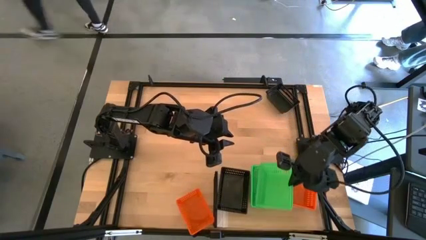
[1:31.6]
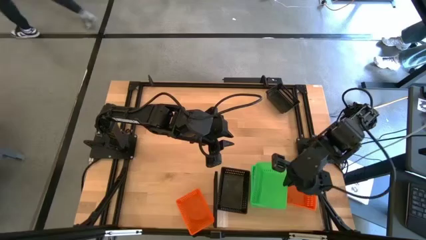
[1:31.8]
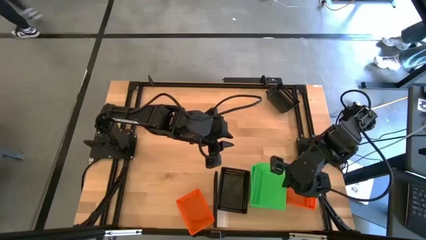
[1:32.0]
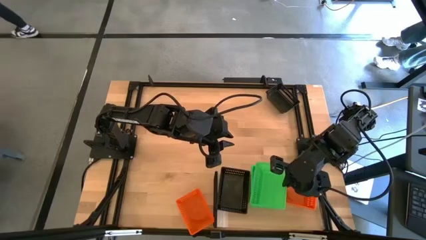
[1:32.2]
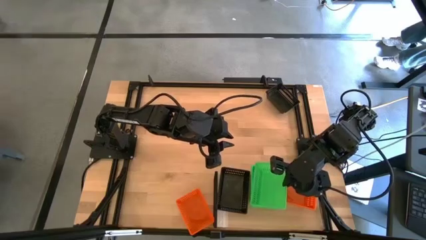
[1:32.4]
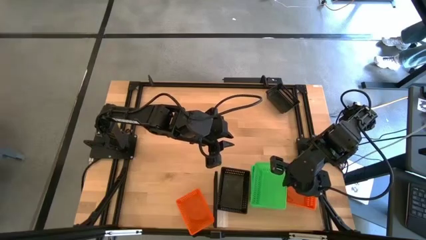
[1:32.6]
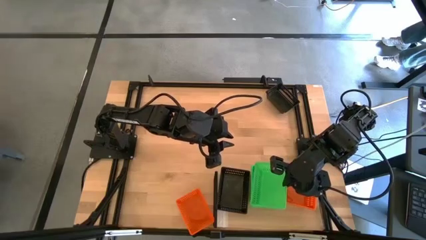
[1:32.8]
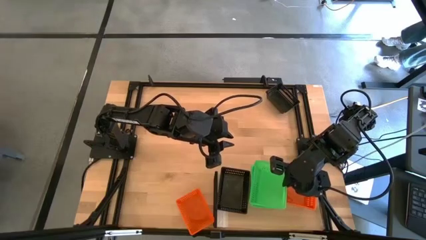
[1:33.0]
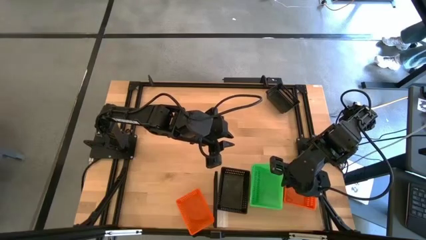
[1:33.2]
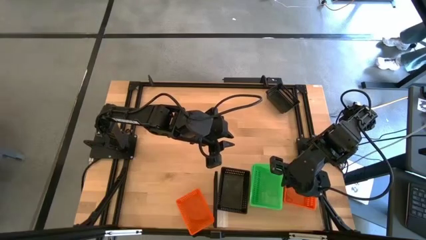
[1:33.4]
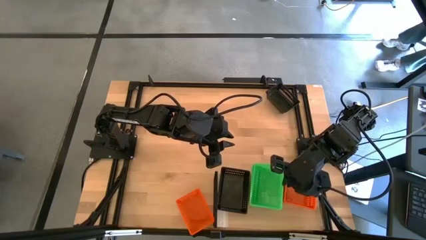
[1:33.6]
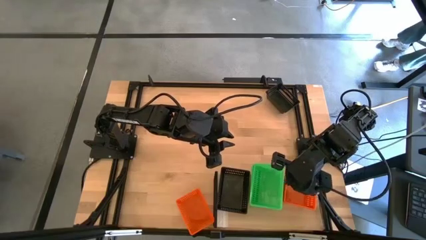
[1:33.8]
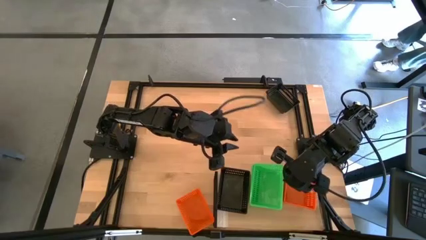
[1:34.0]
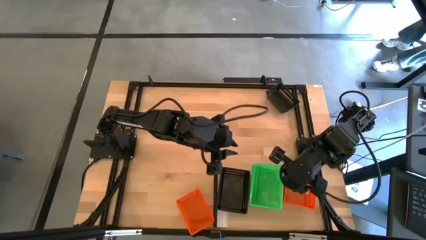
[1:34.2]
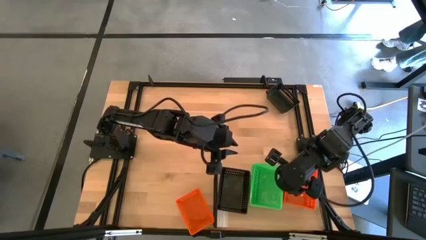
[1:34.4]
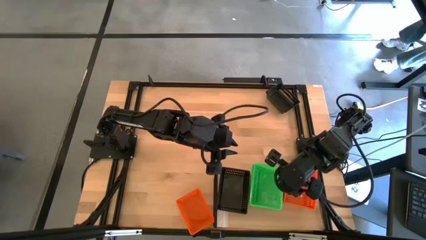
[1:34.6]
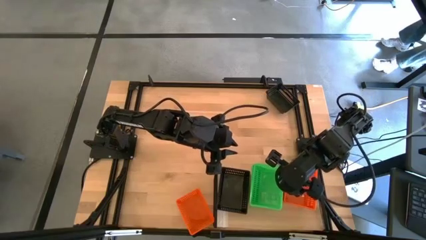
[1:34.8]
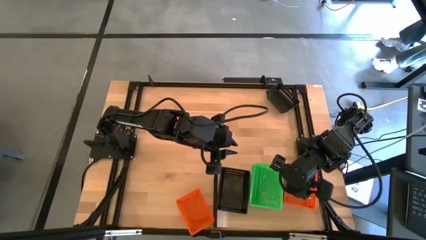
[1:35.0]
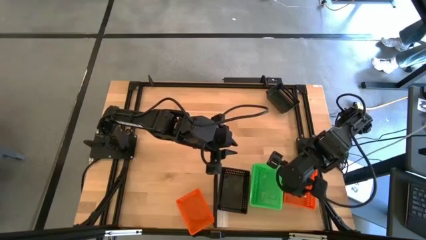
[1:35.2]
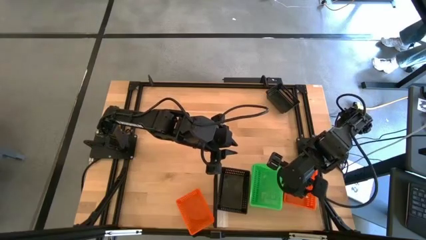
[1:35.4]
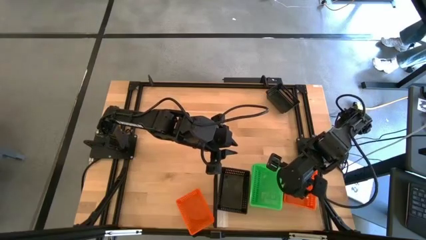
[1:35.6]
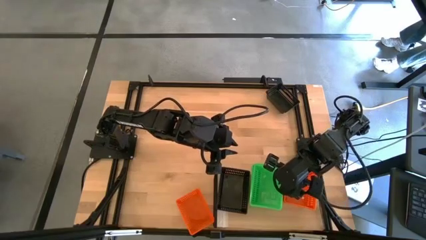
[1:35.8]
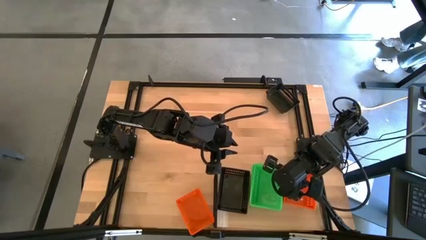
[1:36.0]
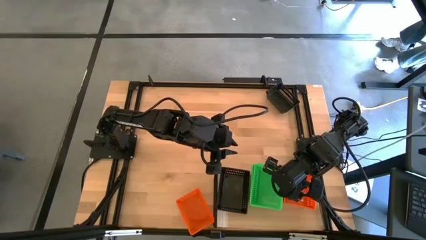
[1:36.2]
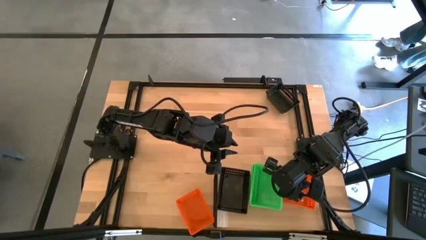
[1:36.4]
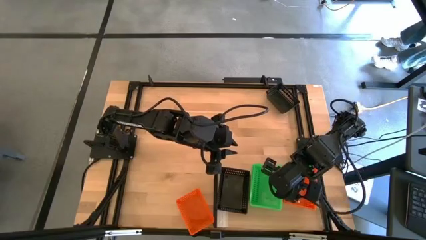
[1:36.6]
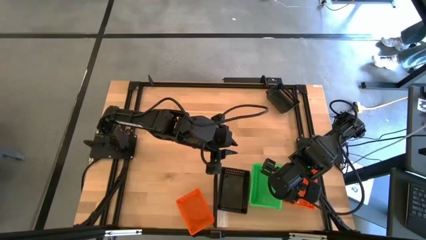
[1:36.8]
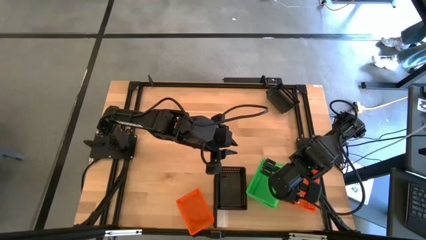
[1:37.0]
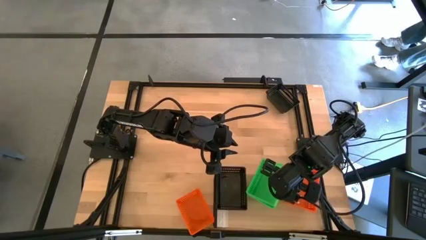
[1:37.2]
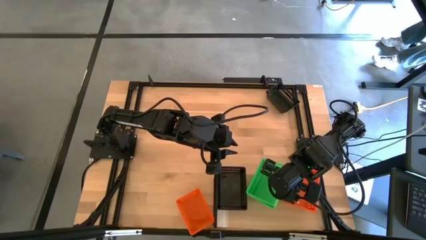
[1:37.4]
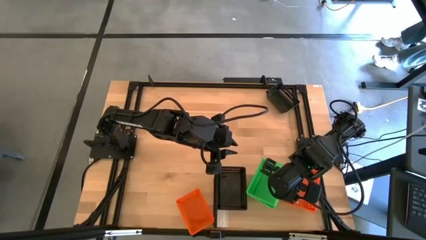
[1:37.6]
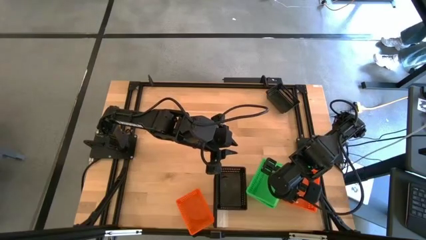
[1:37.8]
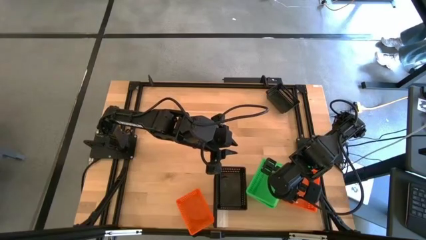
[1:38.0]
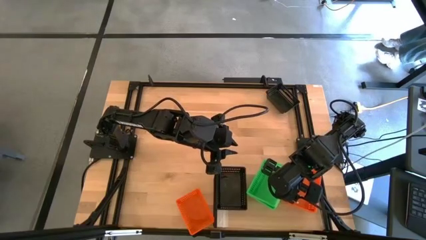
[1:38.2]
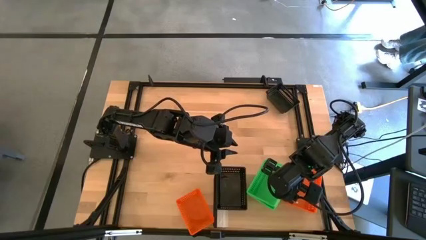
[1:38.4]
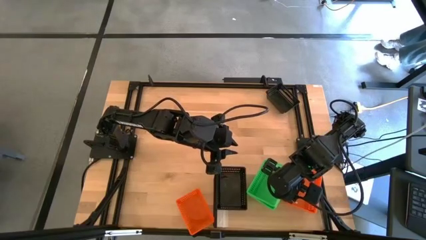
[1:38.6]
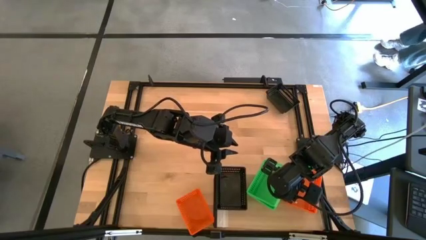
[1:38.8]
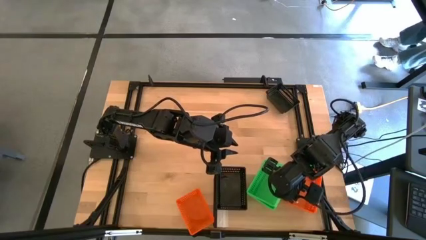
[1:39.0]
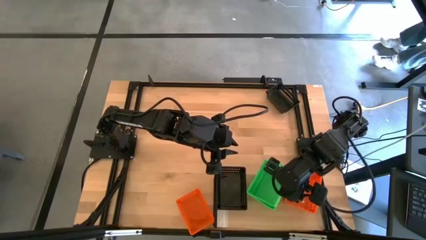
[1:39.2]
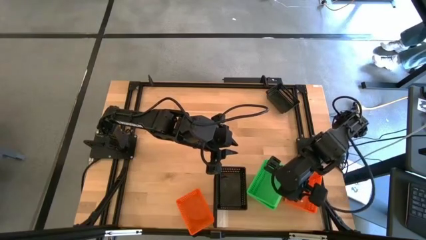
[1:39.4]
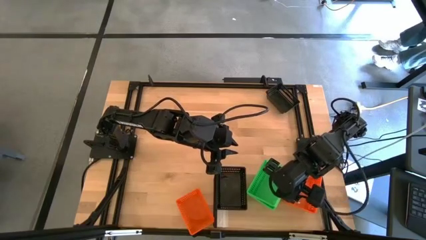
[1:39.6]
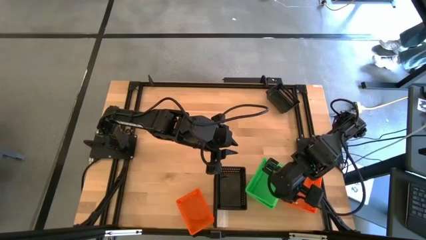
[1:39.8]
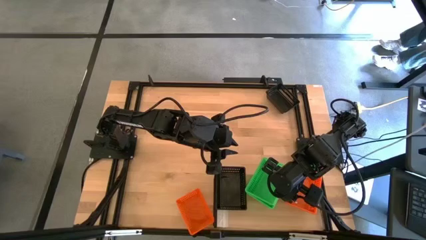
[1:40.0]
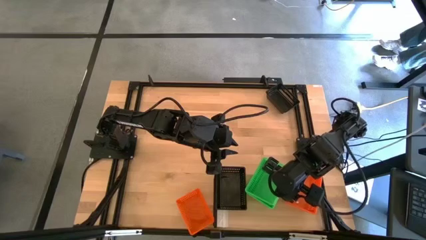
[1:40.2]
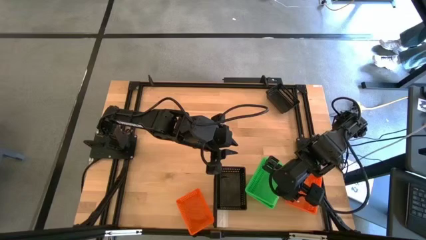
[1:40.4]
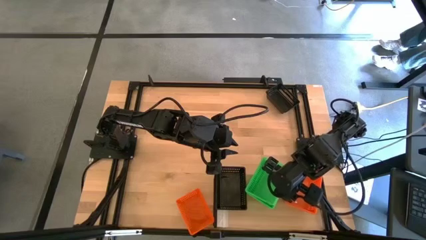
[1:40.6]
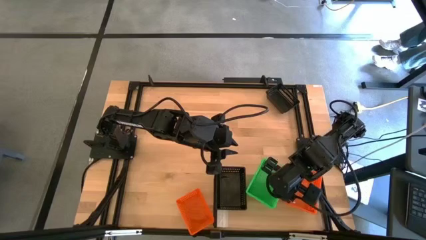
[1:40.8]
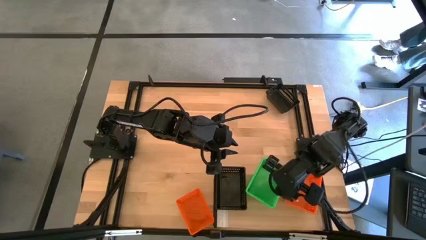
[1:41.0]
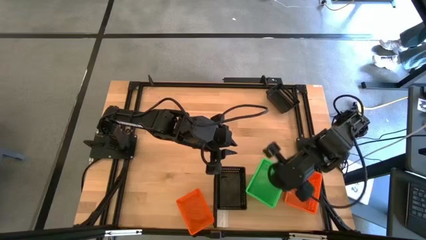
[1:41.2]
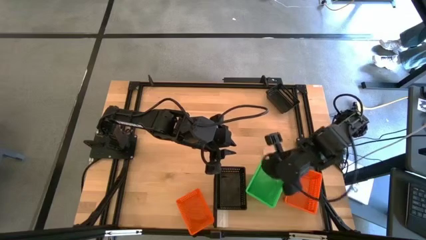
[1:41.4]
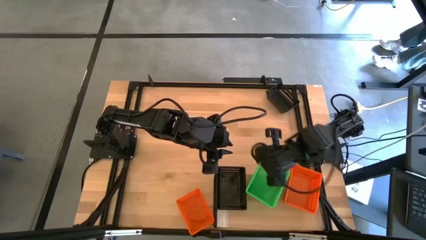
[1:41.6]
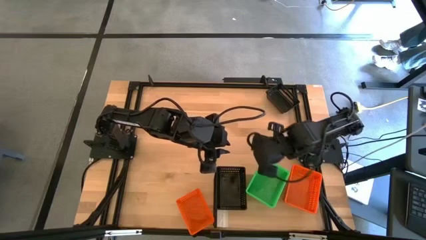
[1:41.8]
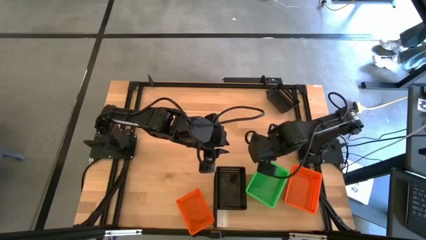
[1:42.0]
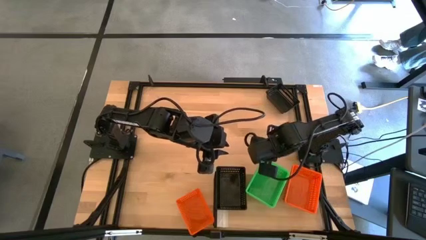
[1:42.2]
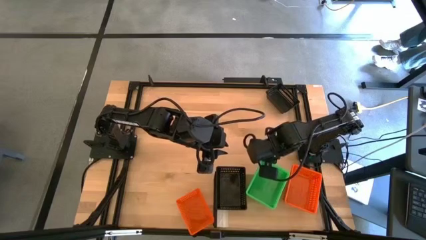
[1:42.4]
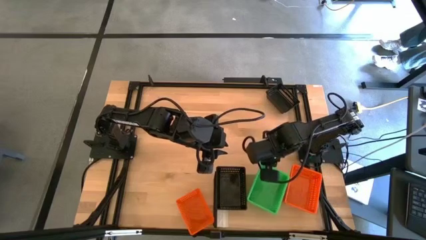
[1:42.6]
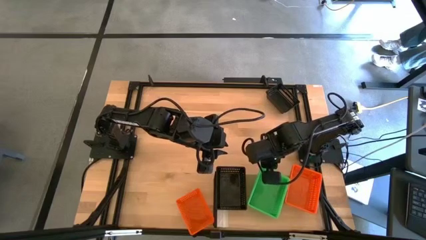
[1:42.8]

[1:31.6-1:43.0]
Task: Stack baskets on shelf by color
Stack the green bin on the stacked green bins on the shelf

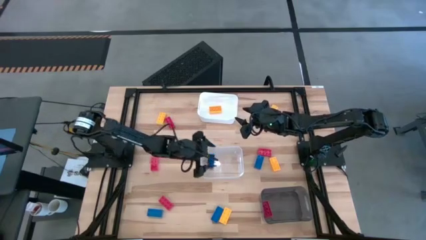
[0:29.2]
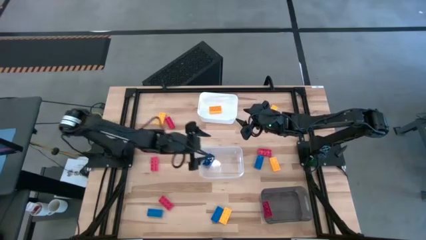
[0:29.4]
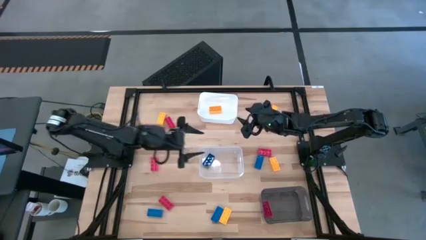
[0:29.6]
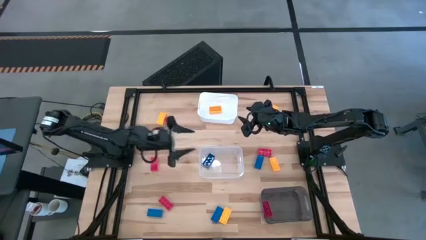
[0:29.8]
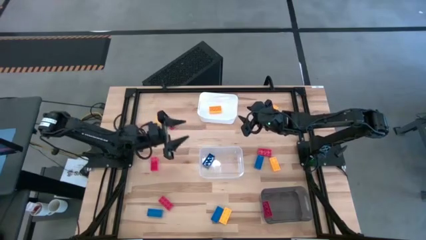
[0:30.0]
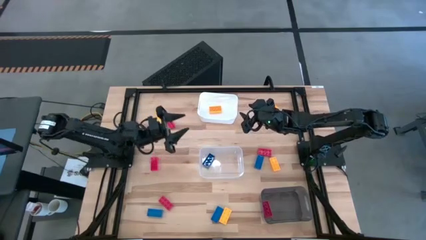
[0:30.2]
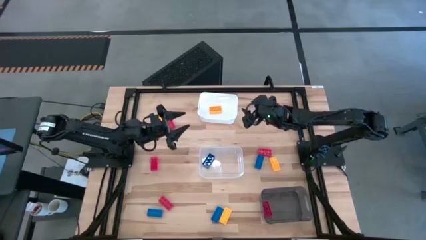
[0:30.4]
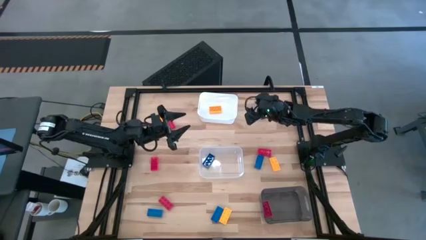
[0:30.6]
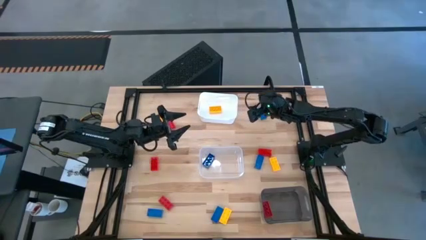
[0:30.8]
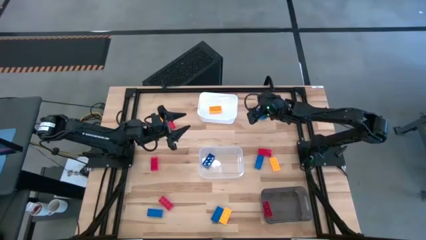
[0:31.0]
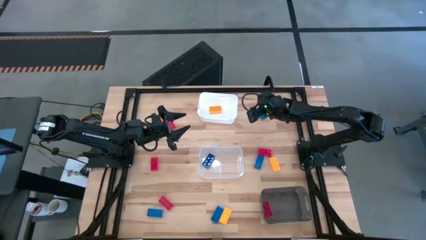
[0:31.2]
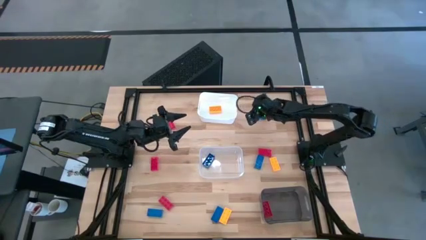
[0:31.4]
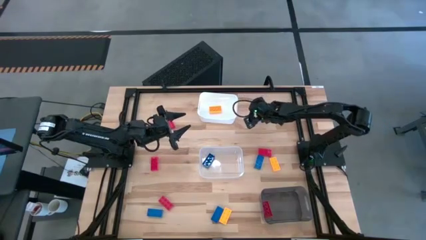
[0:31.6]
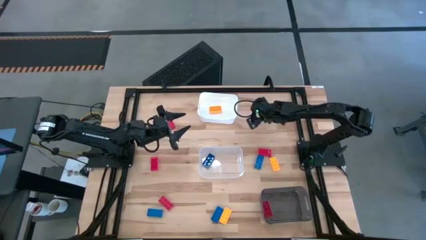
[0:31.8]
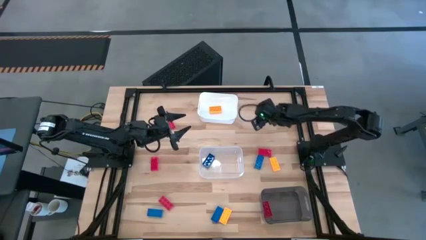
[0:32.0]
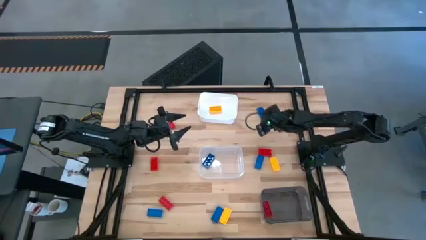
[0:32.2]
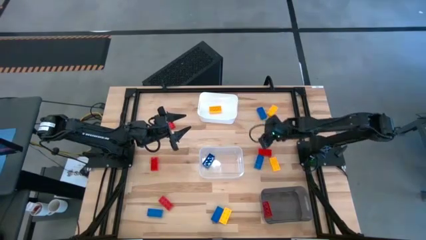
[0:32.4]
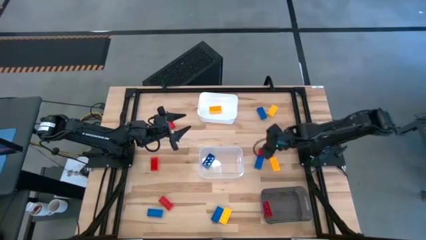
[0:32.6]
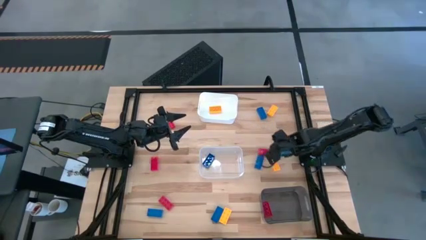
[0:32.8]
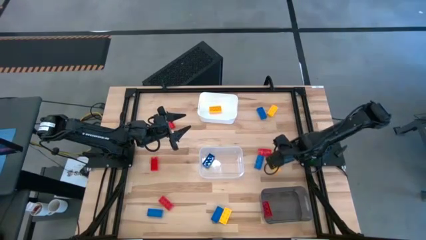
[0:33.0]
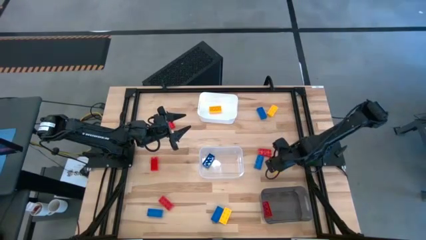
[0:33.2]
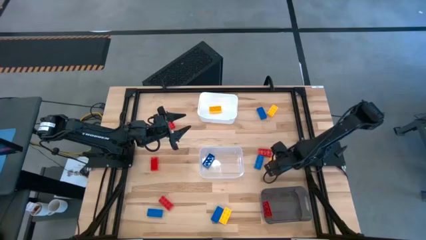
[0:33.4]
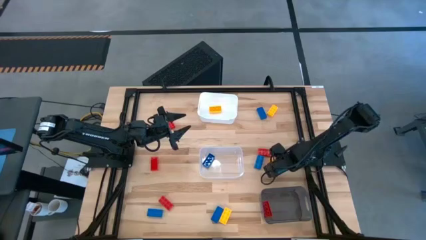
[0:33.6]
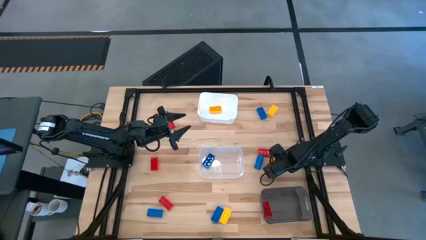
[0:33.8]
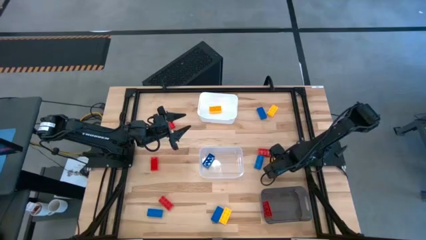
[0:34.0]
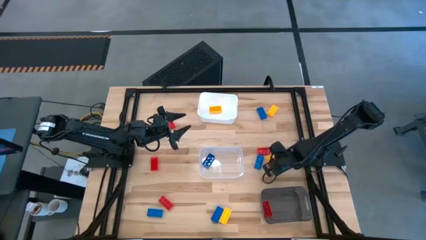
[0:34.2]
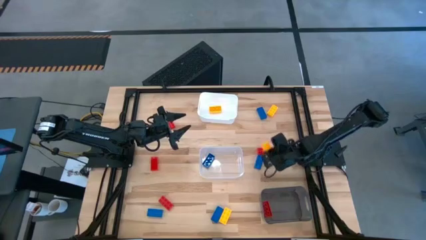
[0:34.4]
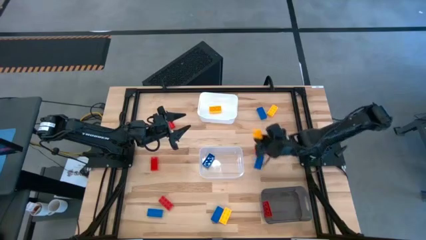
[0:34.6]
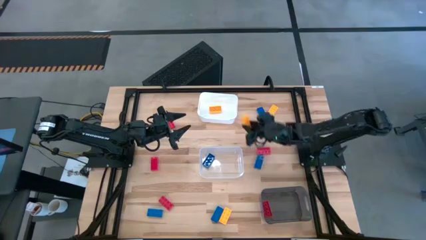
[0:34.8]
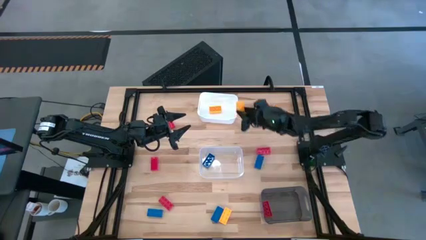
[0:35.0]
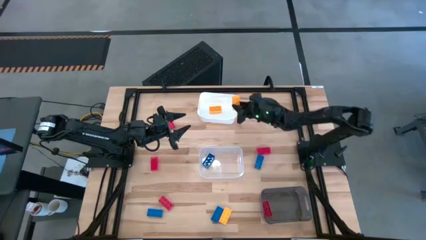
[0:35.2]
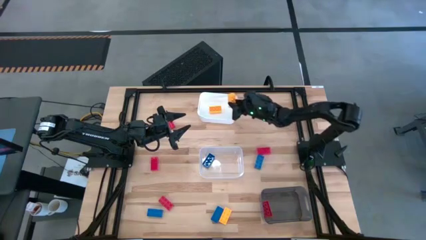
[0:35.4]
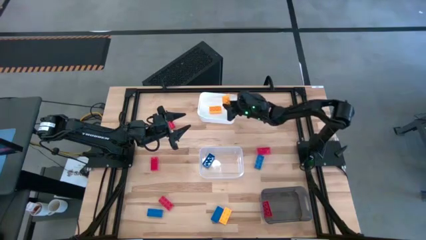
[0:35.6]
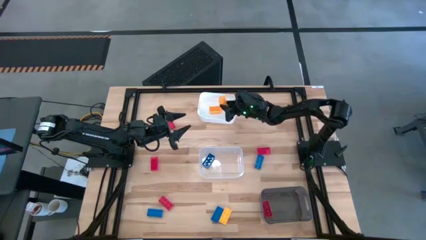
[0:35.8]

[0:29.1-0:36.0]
Task: Sort & place blocks by color
Put the yellow game piece into the white bin
